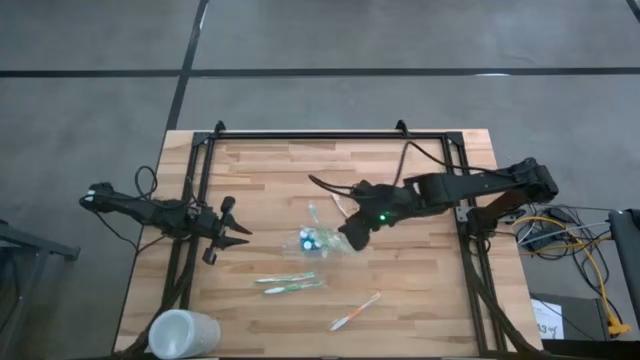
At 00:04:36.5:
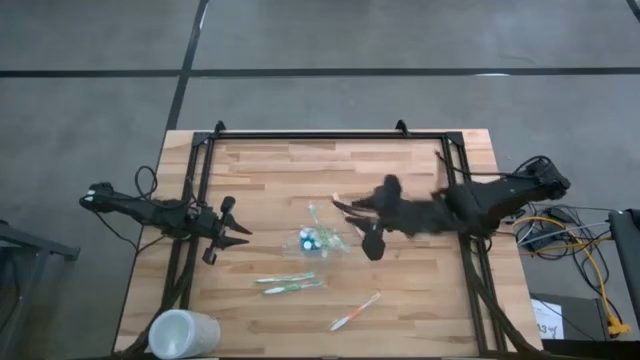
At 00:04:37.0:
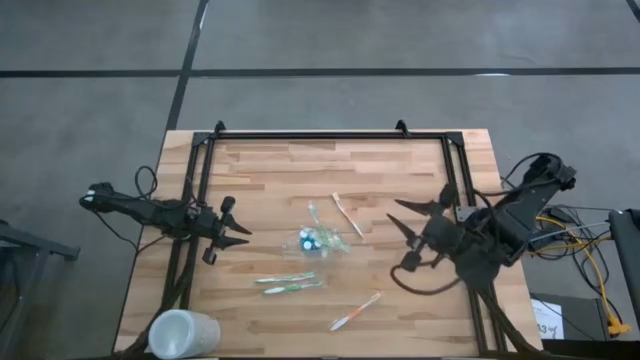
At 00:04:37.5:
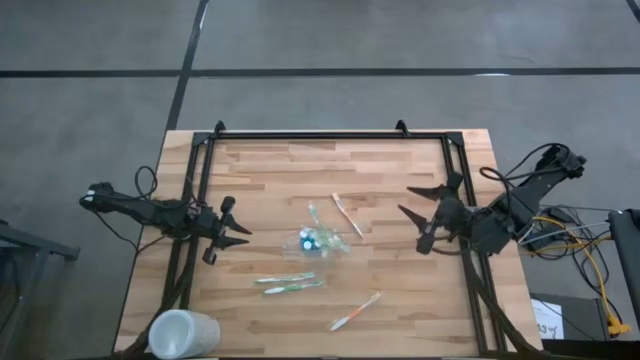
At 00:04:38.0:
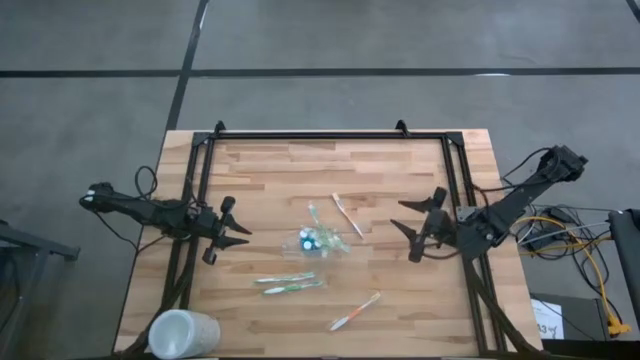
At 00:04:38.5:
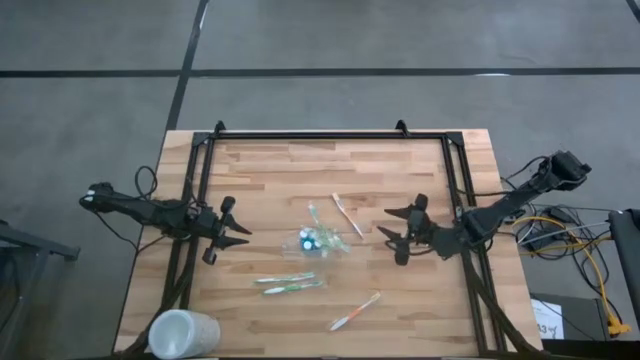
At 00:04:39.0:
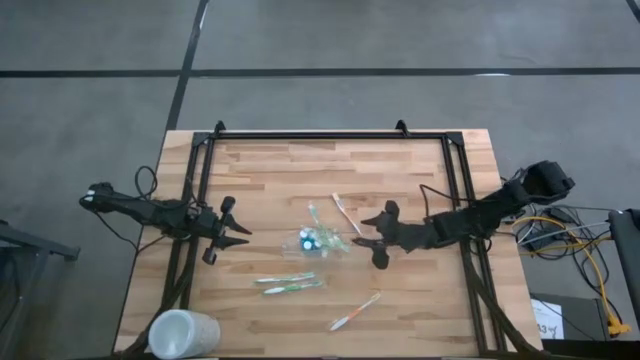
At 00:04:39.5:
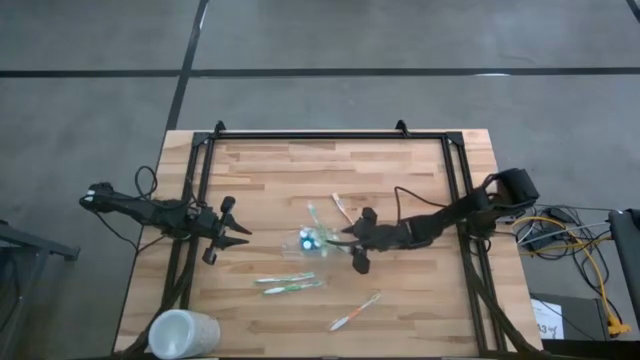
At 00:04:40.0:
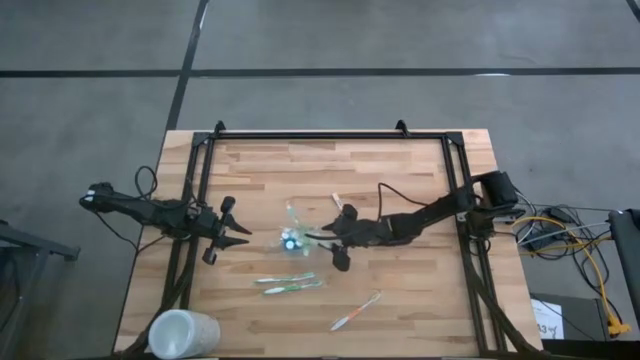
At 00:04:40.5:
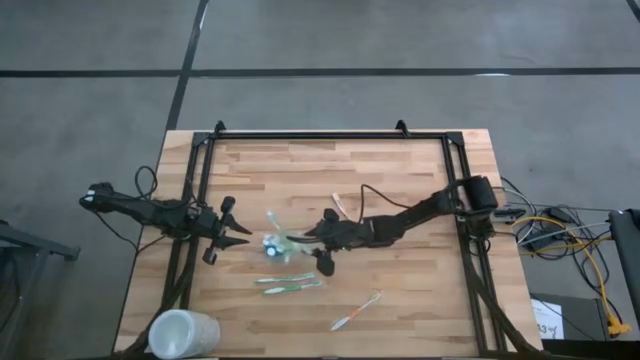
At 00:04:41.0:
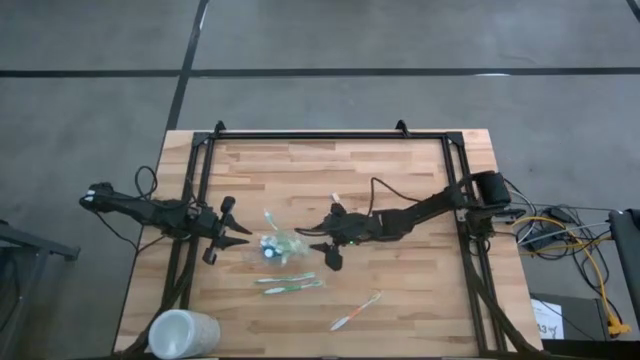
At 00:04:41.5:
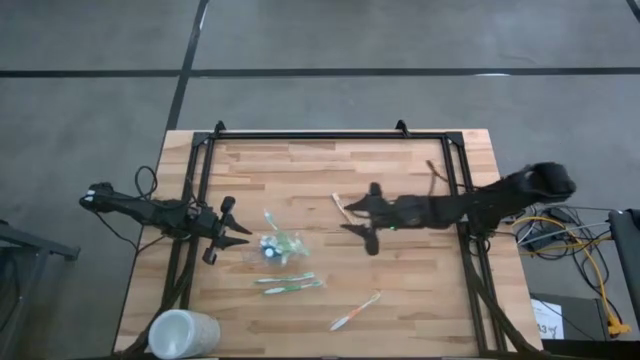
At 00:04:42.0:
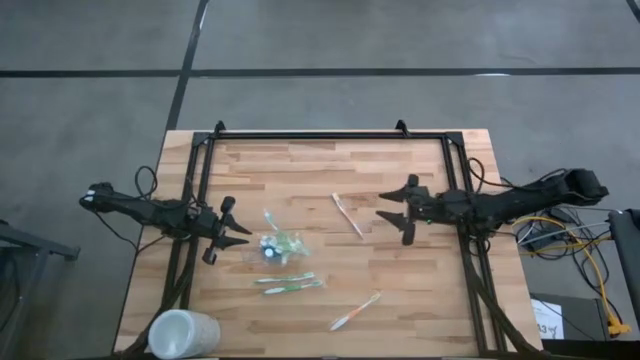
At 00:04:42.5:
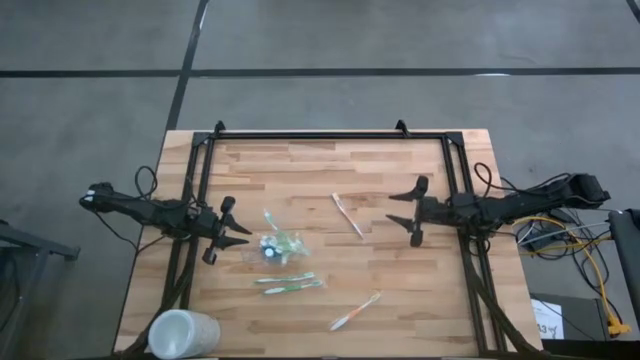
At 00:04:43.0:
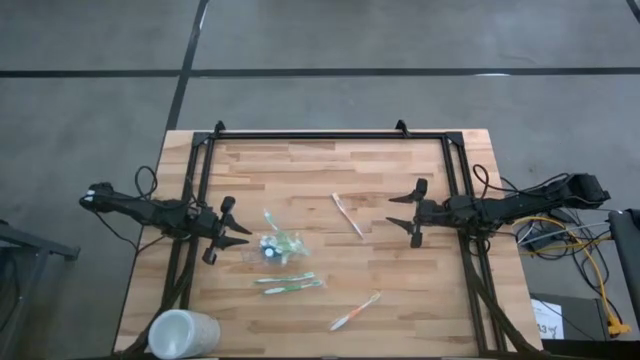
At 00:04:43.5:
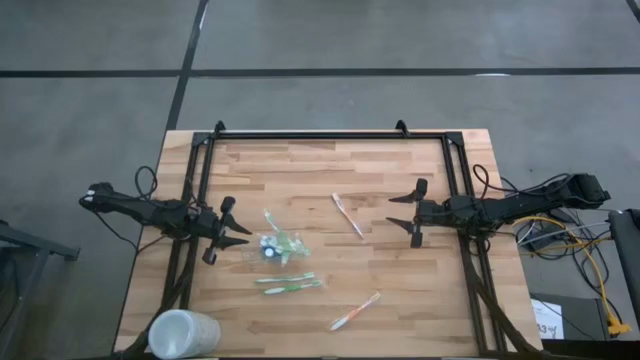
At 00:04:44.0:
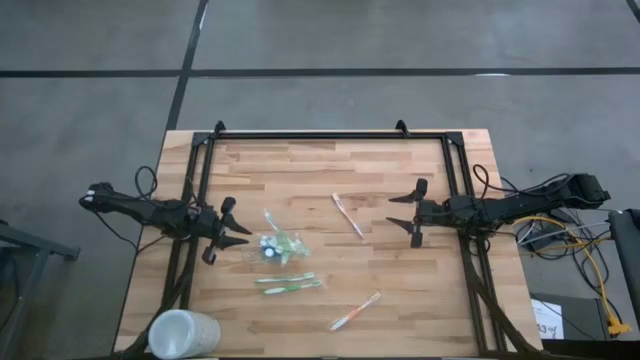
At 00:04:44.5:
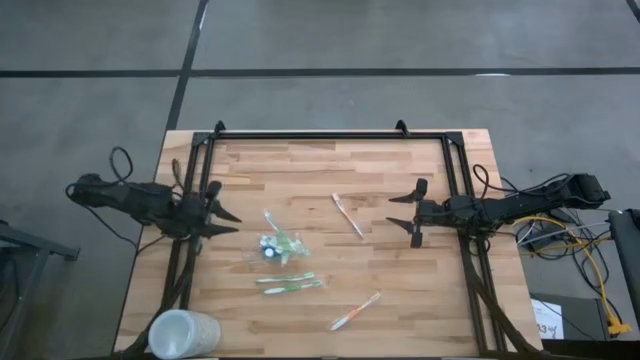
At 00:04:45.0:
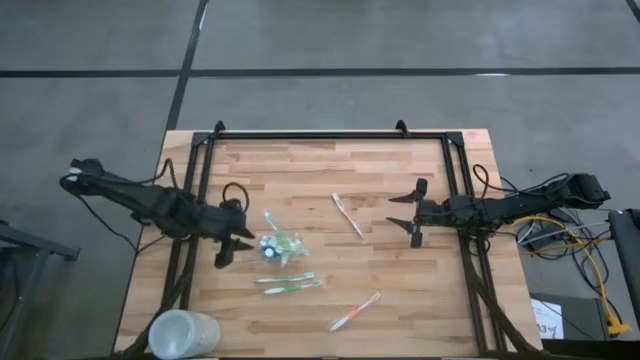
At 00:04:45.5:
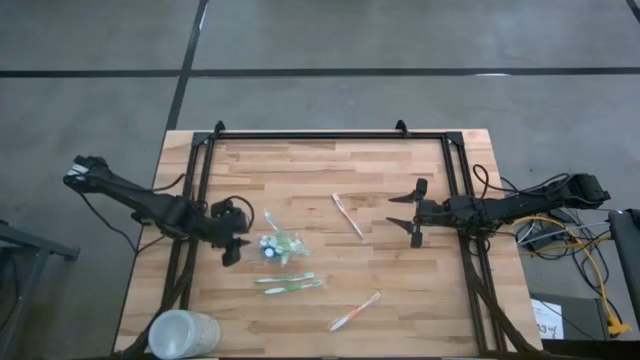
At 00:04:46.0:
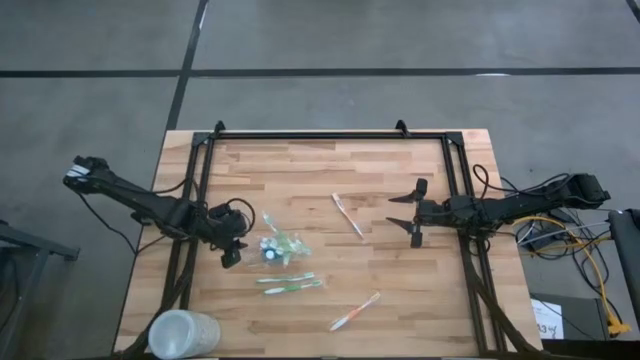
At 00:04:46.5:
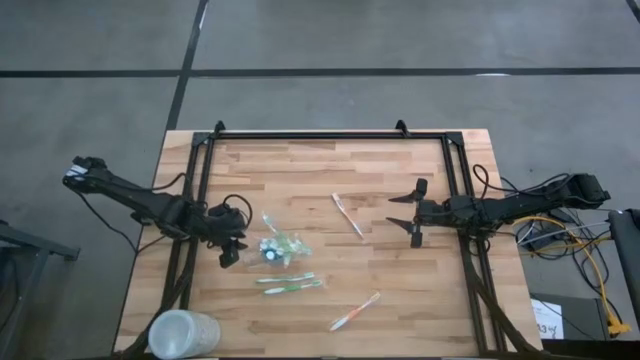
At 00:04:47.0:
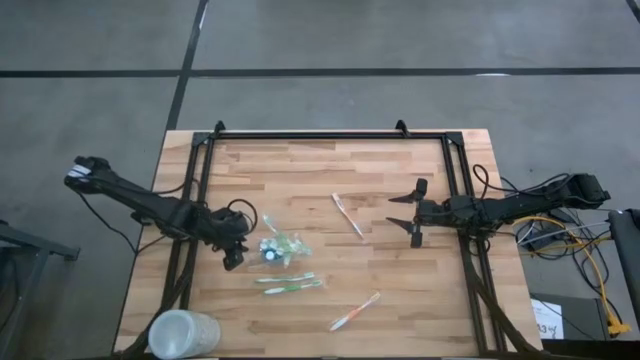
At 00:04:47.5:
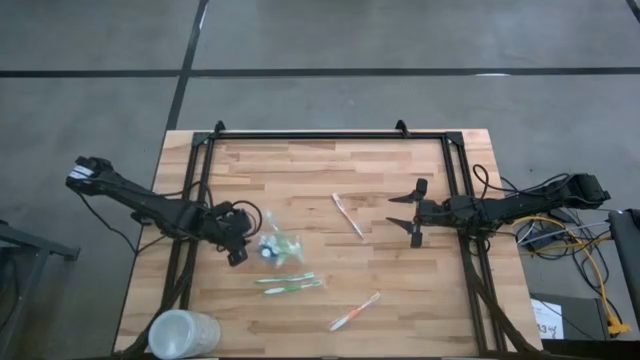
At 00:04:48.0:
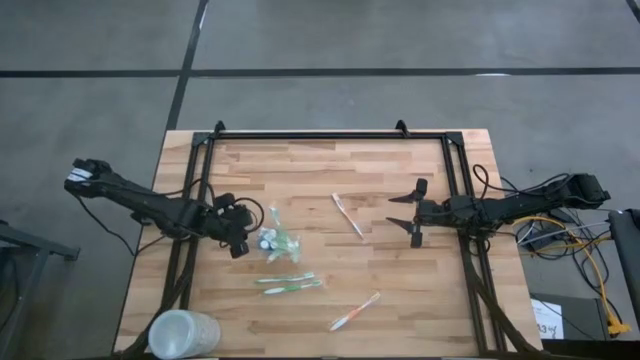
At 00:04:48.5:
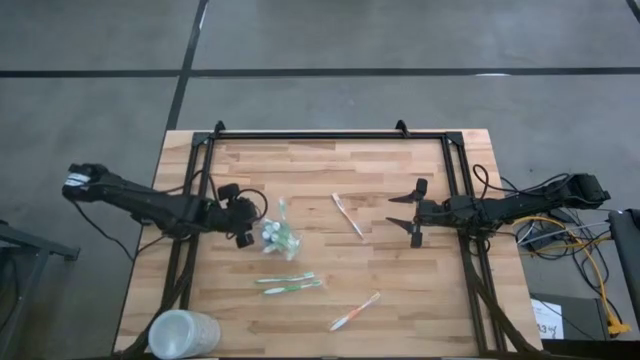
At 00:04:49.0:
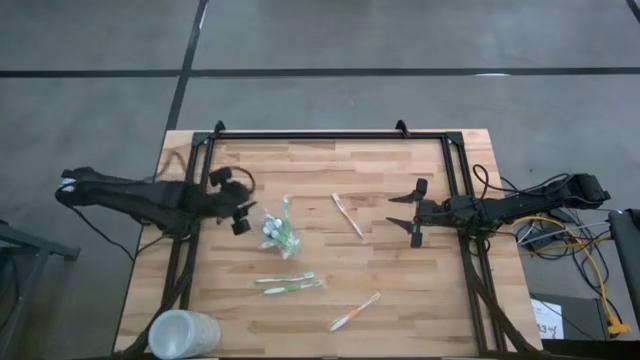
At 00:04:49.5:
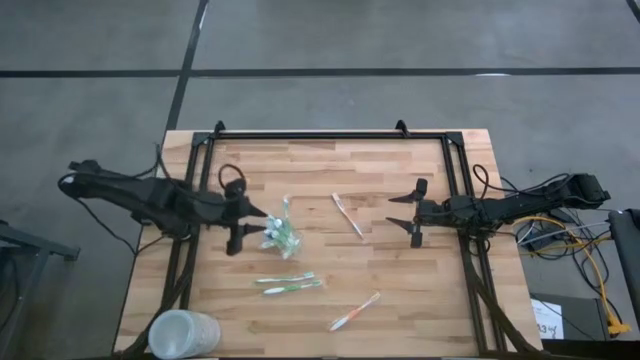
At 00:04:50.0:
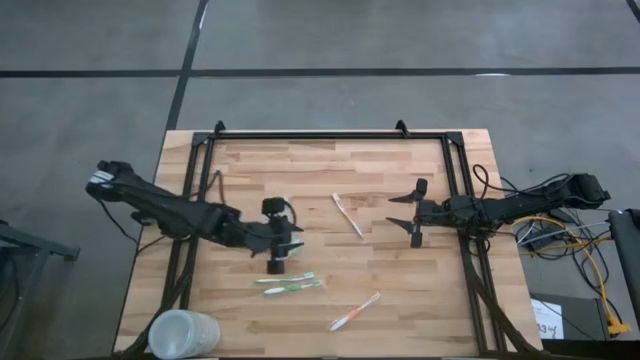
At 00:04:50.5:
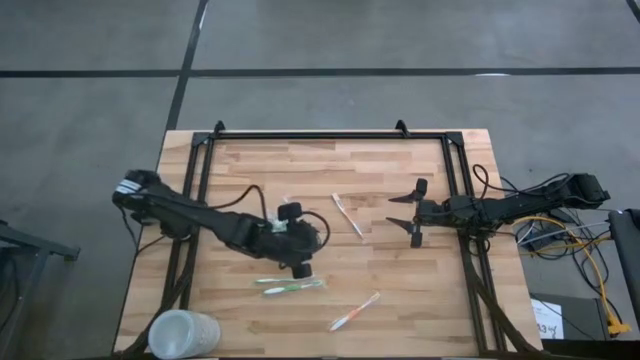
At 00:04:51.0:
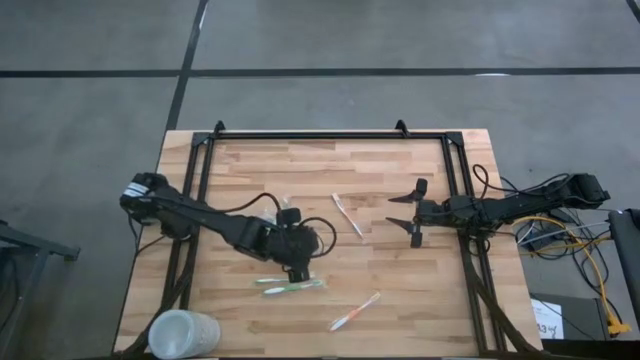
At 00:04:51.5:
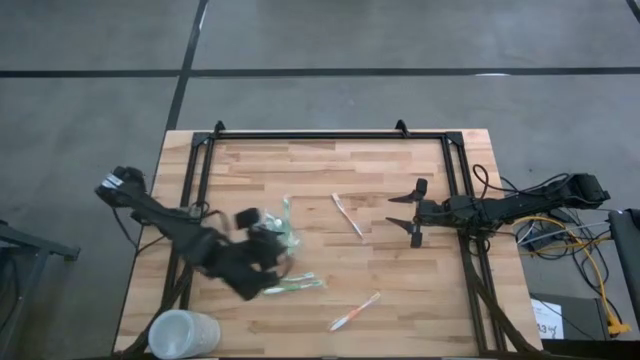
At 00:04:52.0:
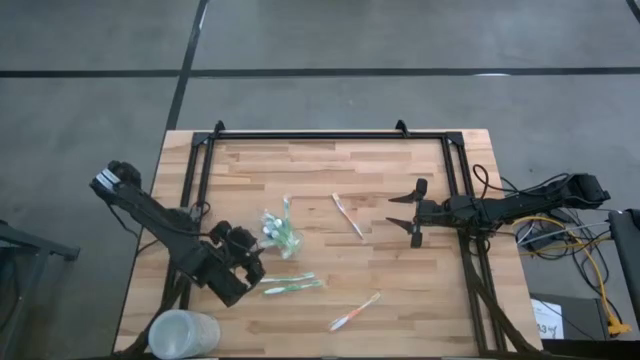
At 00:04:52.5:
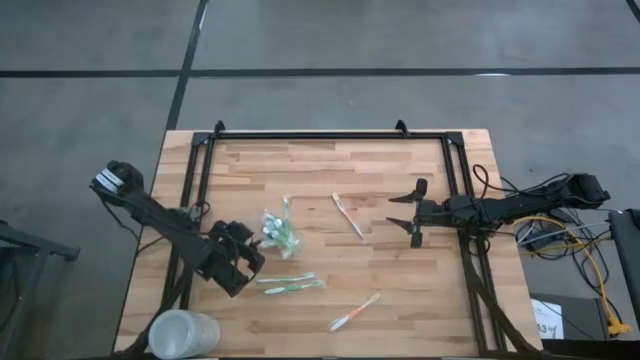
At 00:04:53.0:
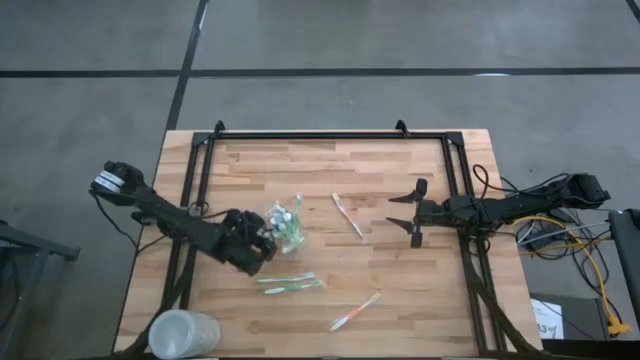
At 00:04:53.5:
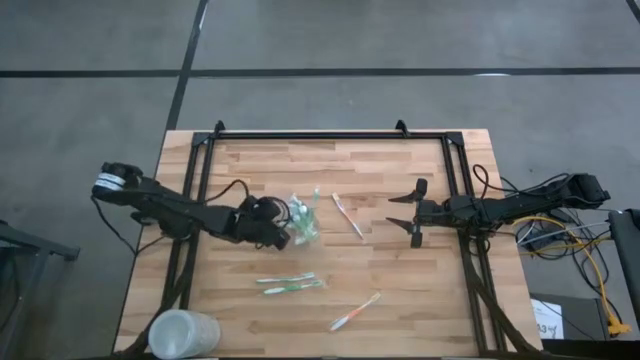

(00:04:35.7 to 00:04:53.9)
Task: Pick & Place toothbrushing station
Adjust the transparent organizer on the table

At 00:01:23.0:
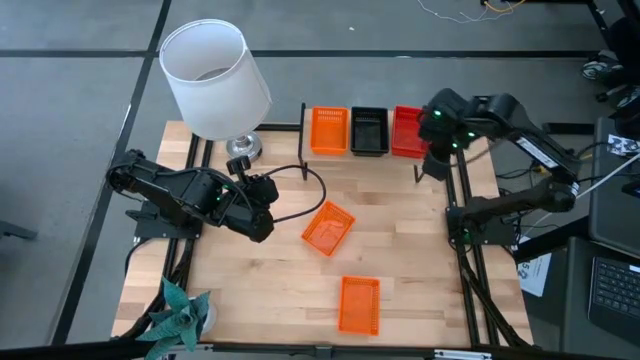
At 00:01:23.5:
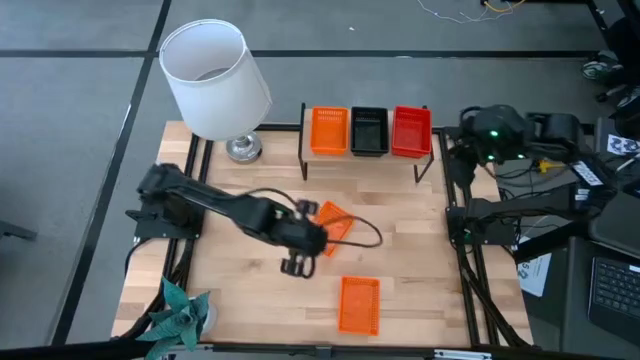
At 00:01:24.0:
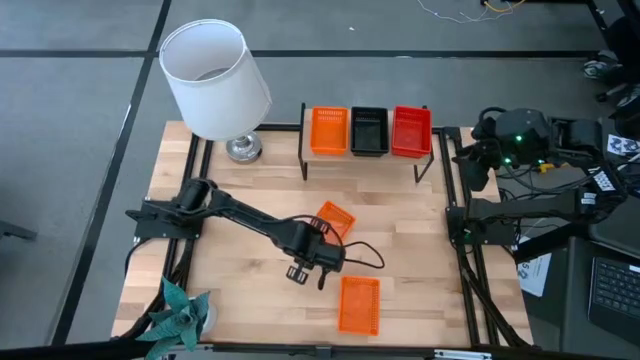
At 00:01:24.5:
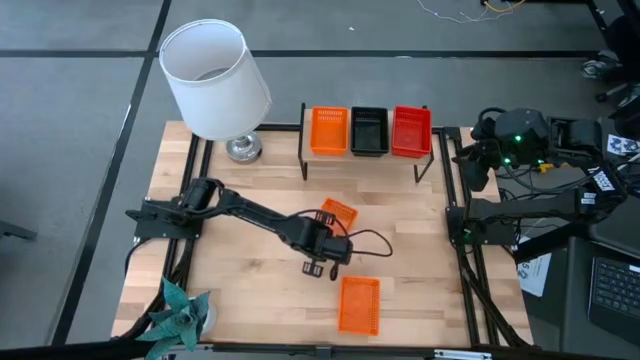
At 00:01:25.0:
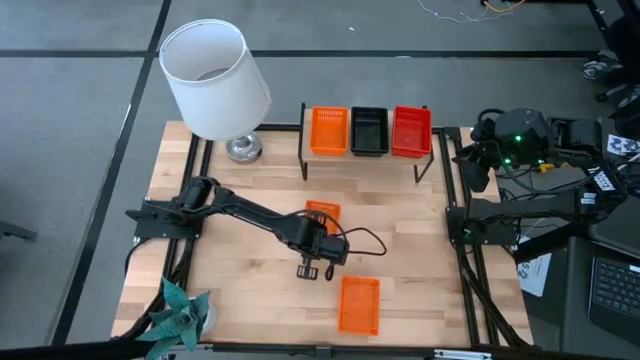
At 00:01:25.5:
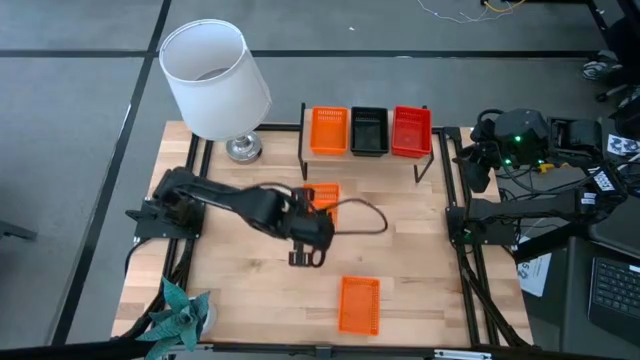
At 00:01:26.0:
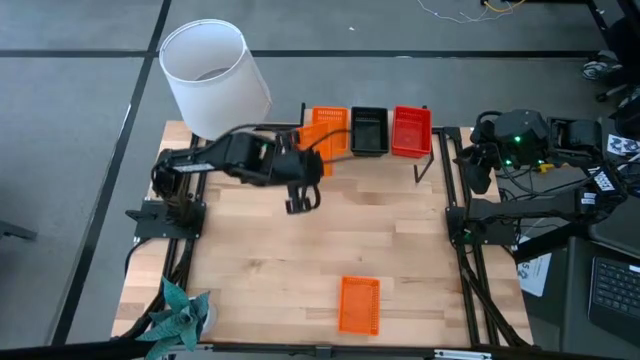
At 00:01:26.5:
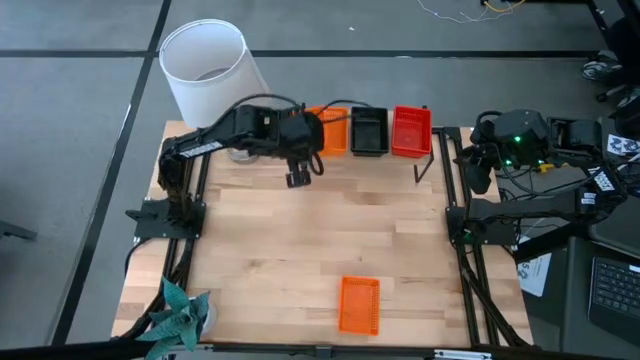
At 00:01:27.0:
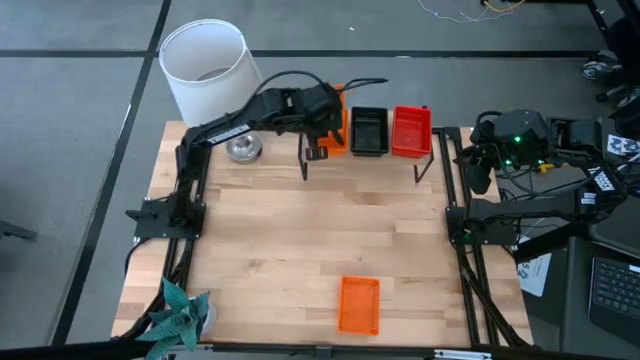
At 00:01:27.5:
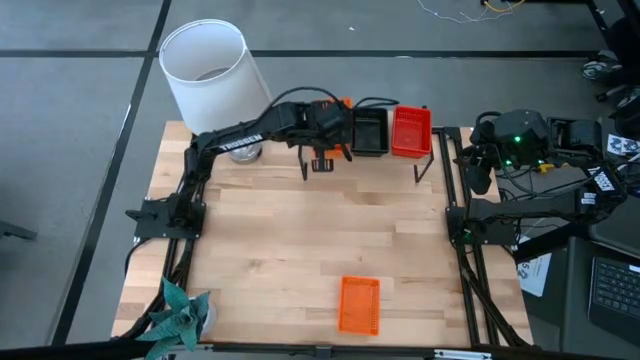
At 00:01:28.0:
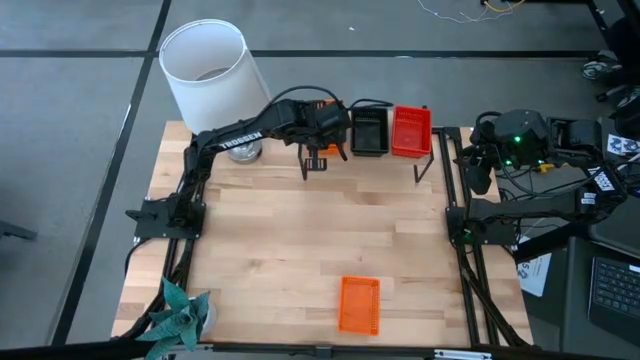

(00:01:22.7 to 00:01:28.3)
Task: Stack baskets on shelf by color
Stack the top orange bin on the orange bin on the shelf
